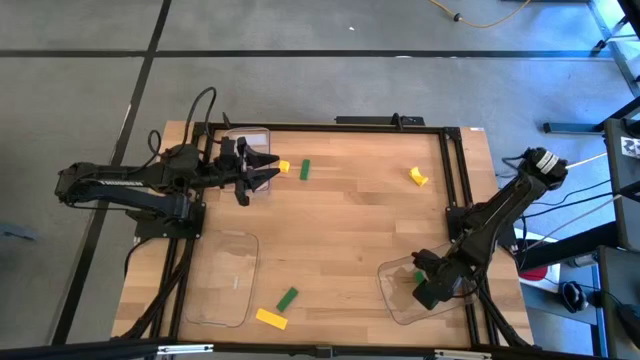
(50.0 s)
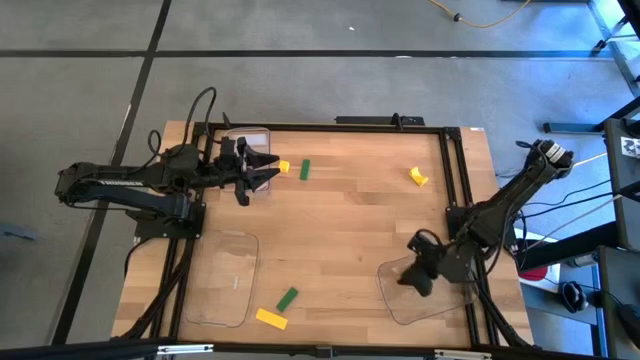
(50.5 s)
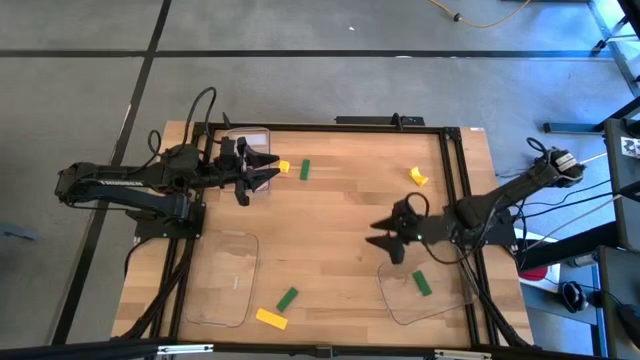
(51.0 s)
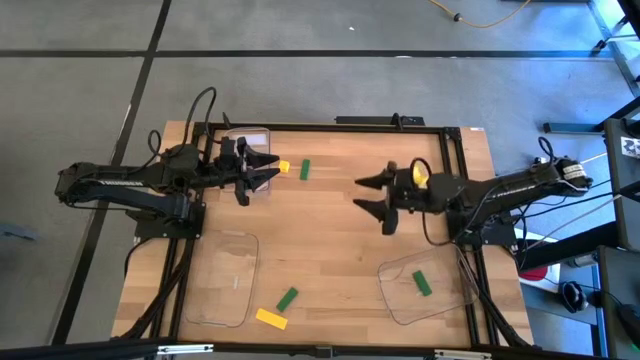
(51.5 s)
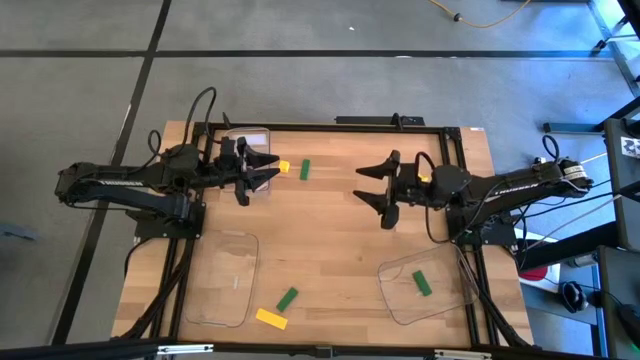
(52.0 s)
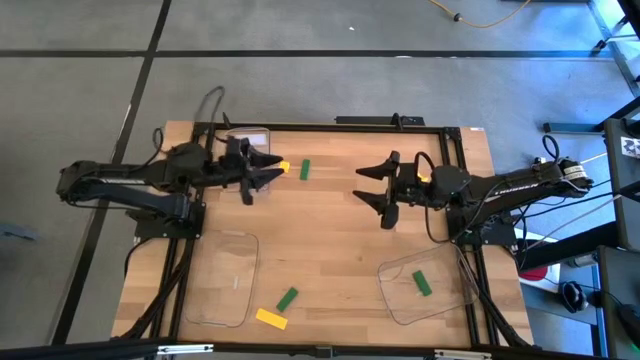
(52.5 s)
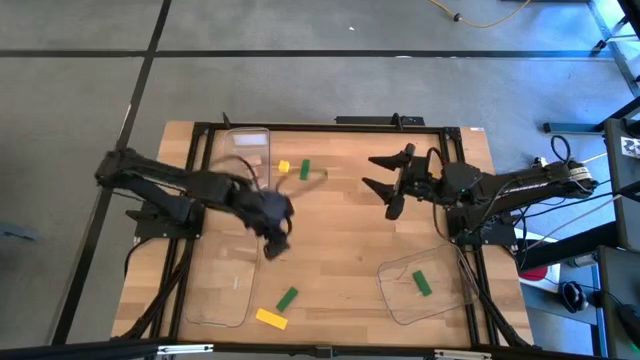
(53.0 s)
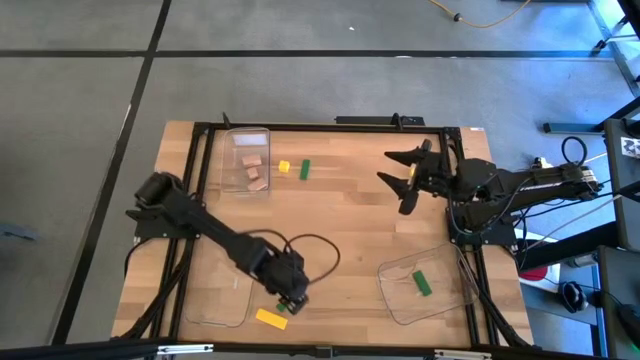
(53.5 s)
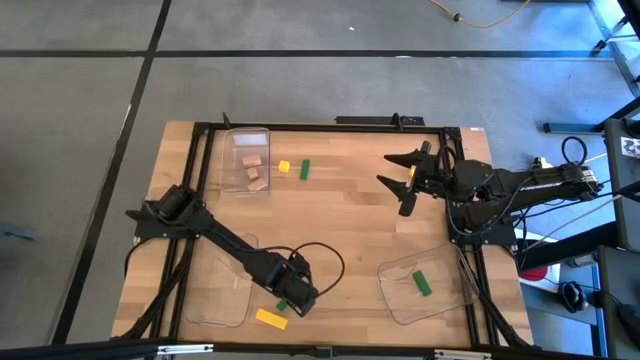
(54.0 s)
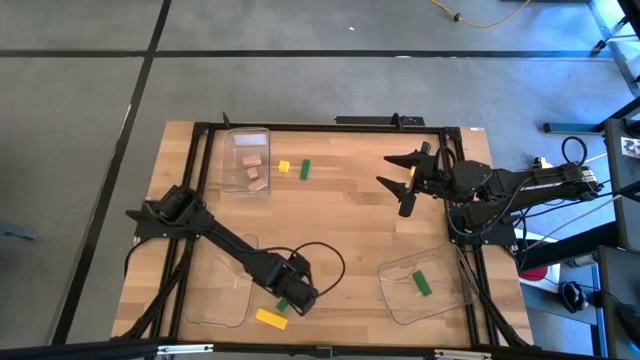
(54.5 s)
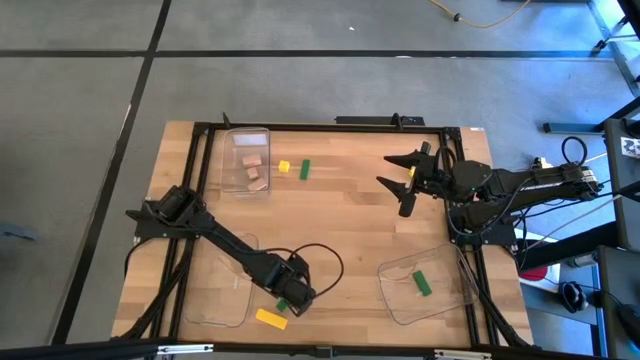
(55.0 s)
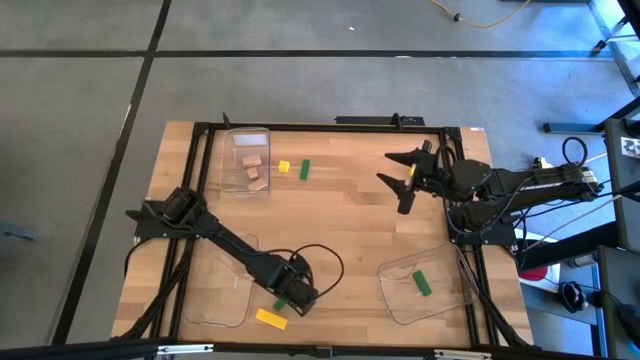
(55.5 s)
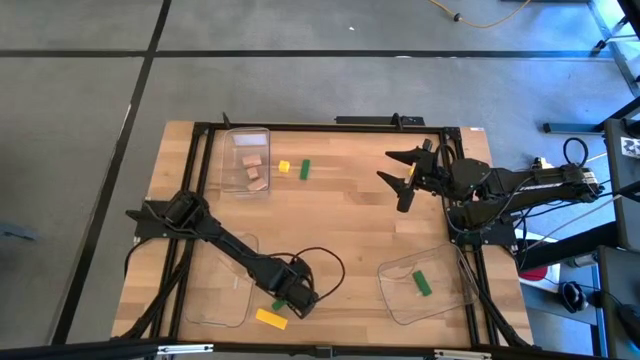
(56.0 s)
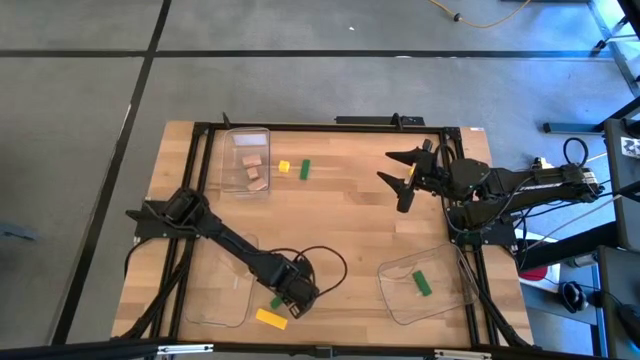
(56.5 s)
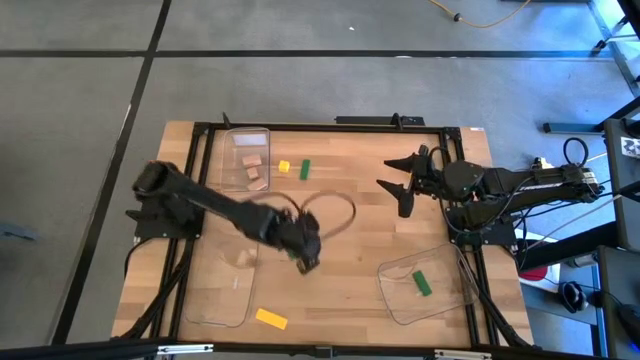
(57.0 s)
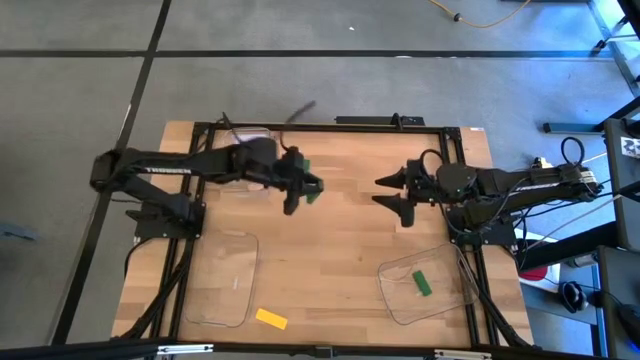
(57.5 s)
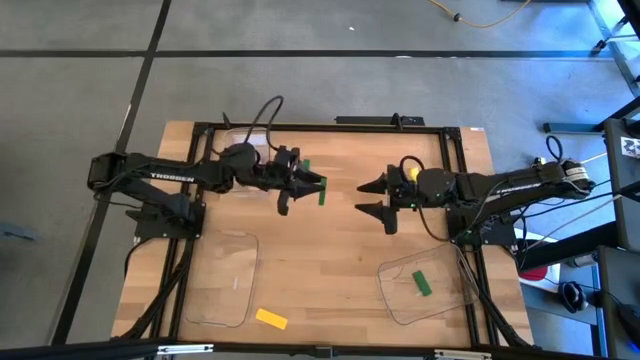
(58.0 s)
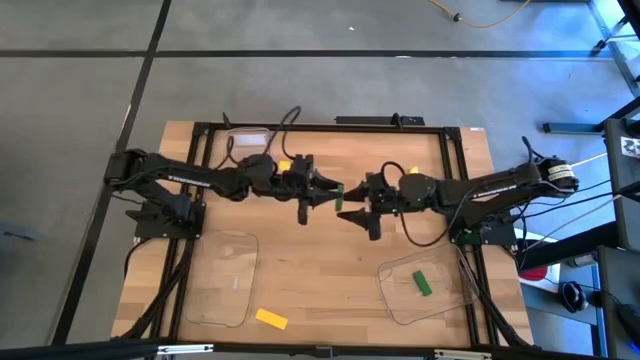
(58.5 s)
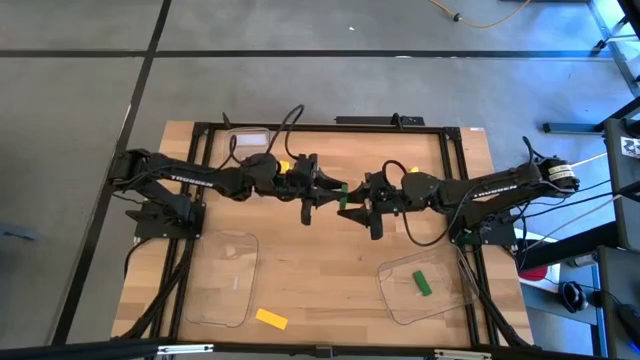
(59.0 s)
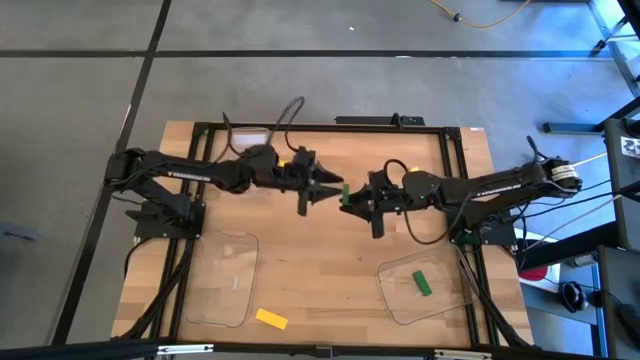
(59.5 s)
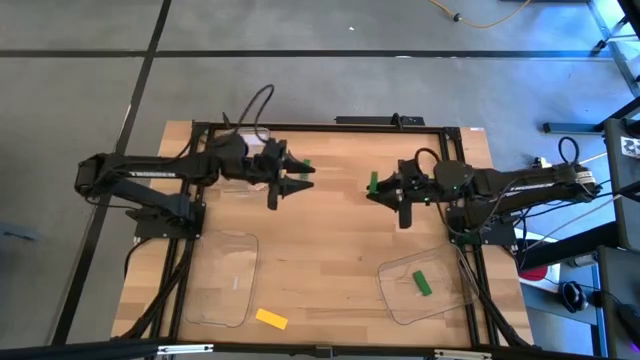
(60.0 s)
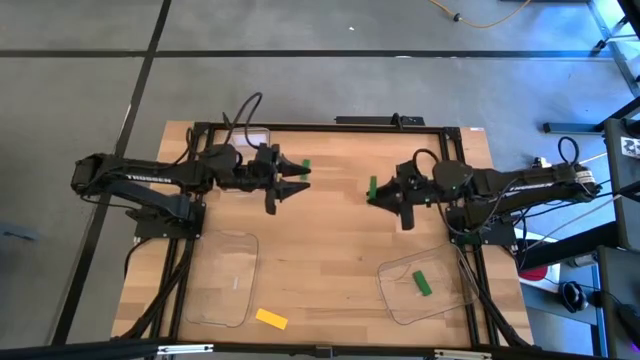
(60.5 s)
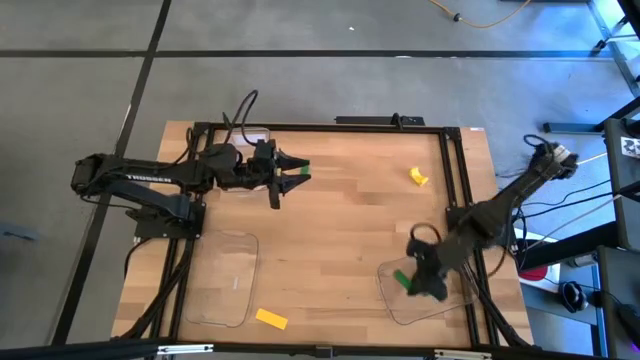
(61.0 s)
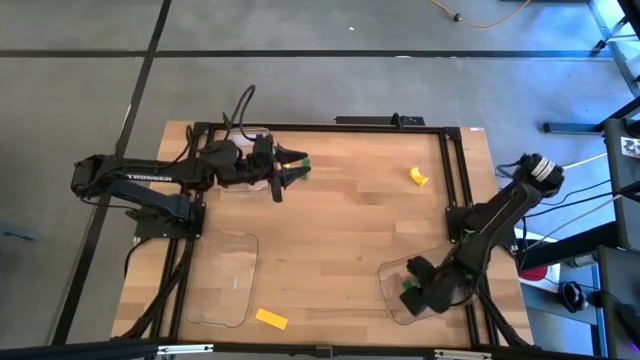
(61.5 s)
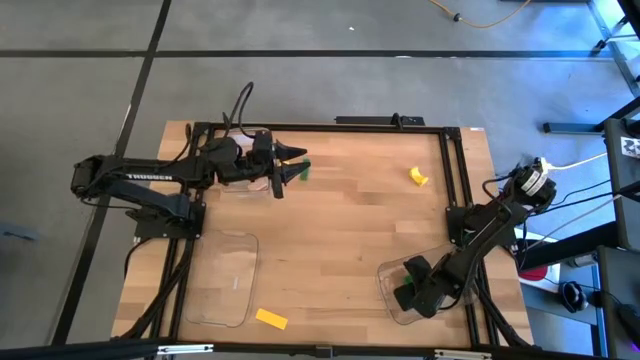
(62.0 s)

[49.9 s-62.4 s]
Task: Sort & place blocks by color
Put the bottom green block into the bottom right transparent bin

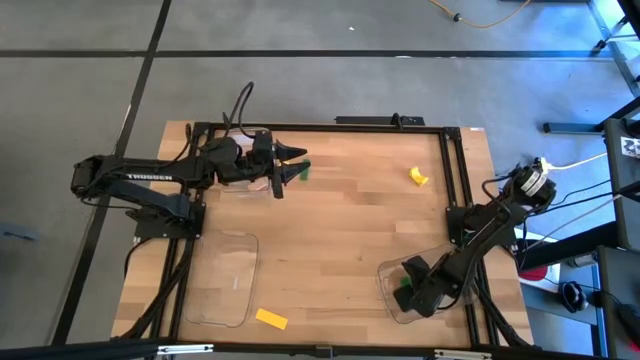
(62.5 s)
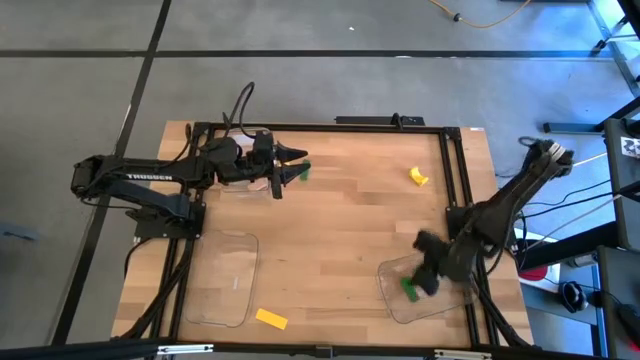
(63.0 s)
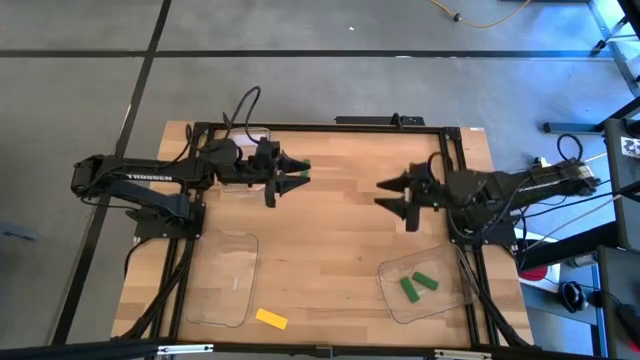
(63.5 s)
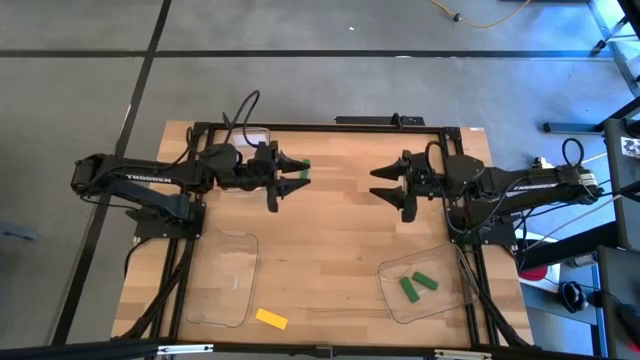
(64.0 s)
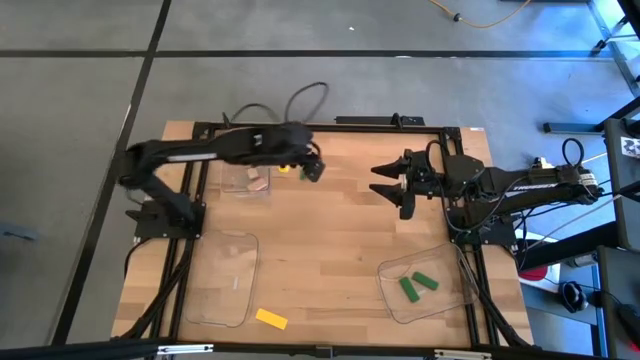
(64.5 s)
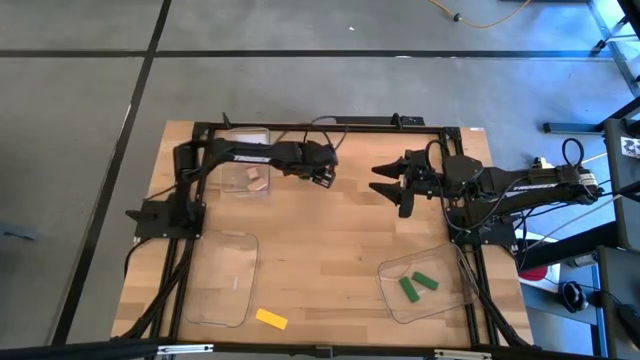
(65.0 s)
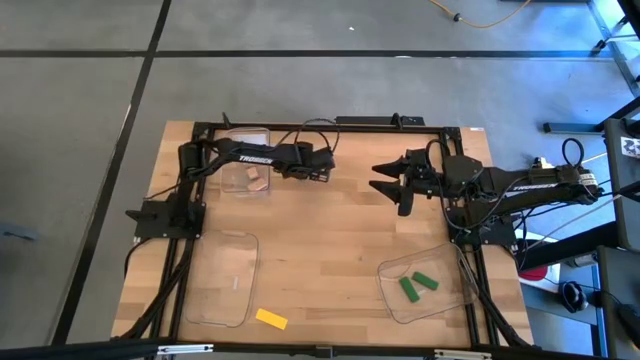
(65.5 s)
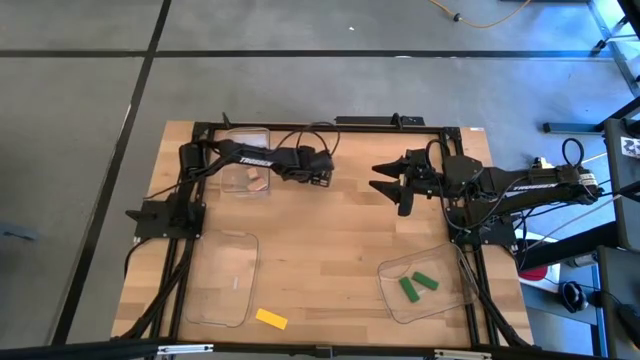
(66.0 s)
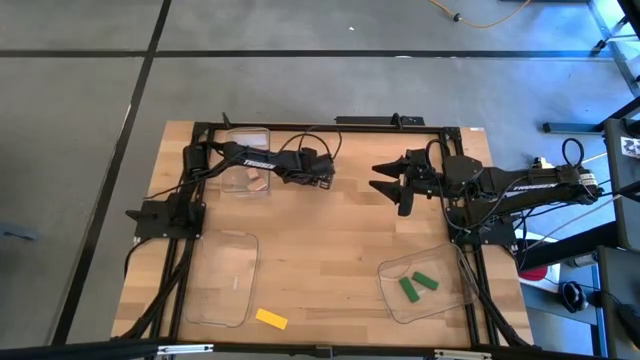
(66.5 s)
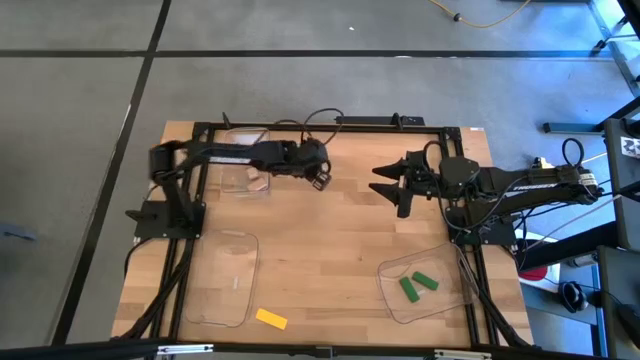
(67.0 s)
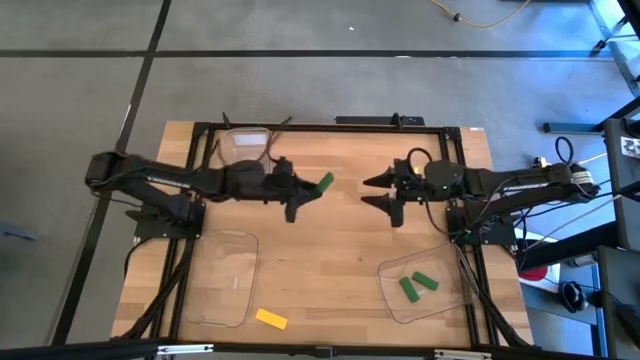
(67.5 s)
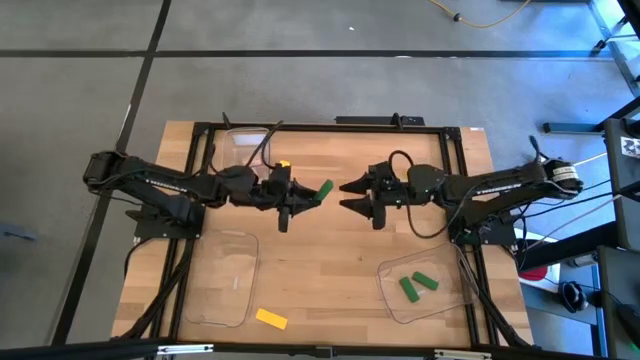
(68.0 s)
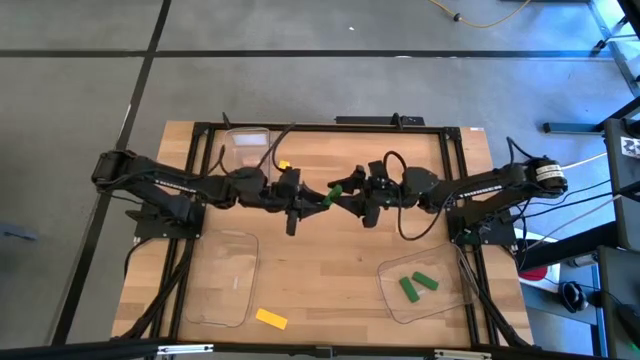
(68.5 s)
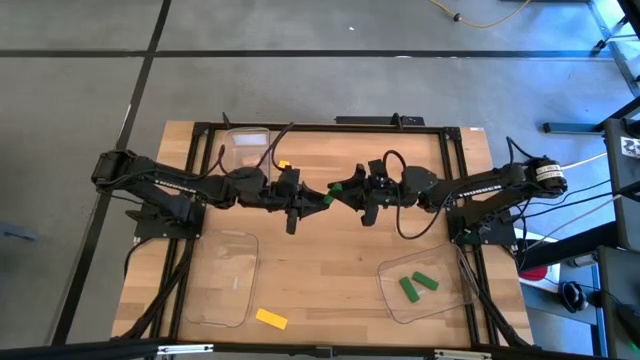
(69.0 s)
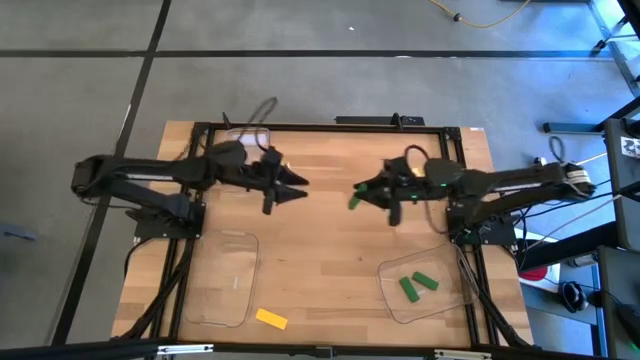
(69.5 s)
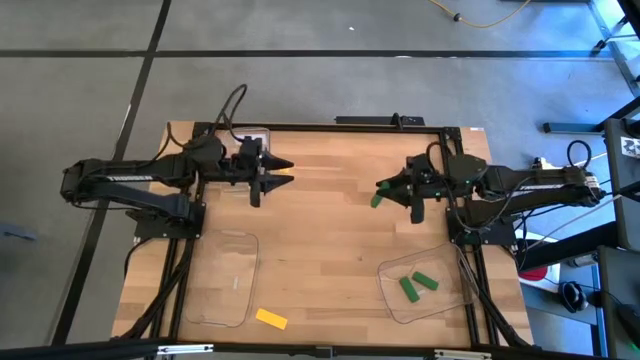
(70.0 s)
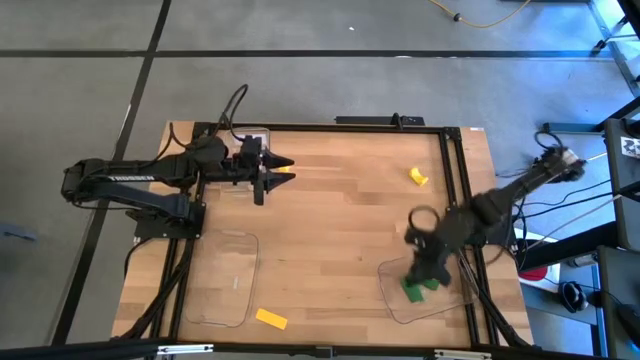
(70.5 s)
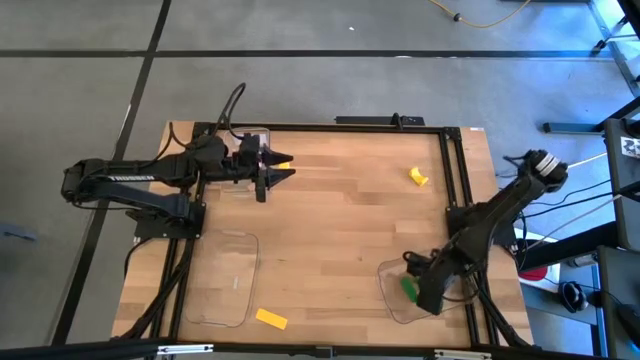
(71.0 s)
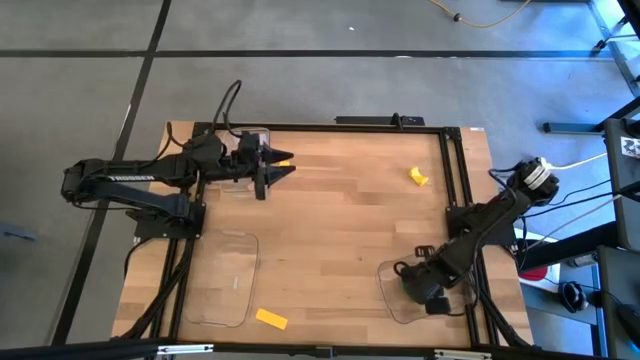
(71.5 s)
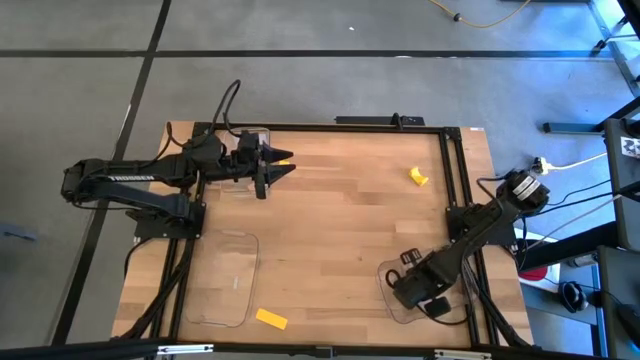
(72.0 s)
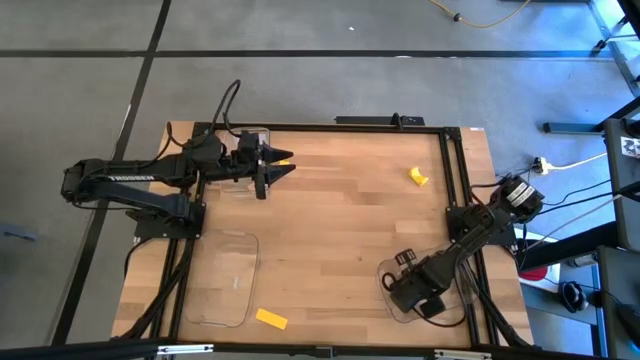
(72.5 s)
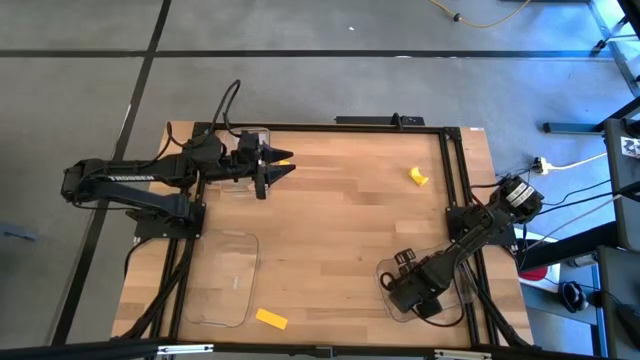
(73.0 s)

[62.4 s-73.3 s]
Put the green block into the bottom right transparent bin
